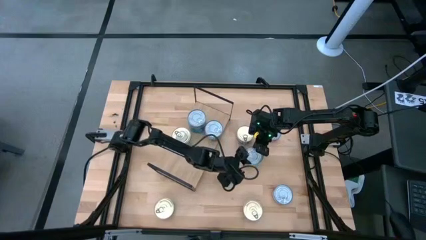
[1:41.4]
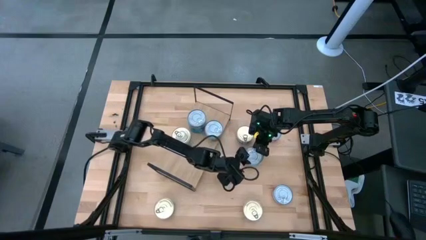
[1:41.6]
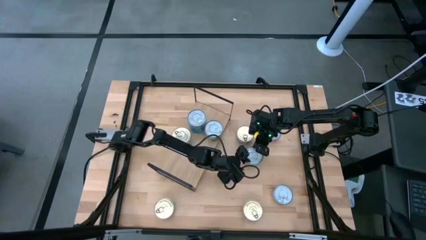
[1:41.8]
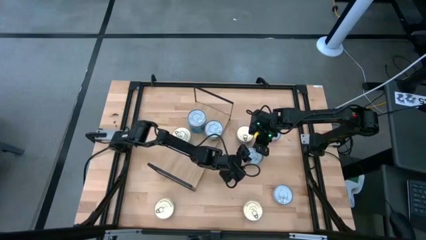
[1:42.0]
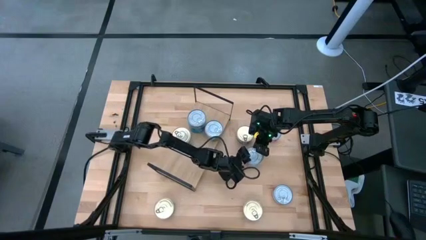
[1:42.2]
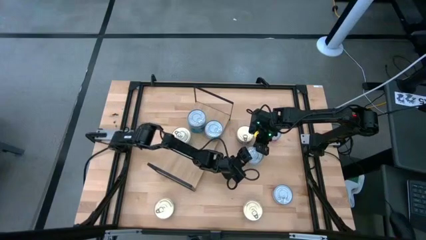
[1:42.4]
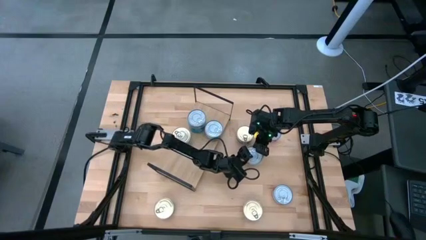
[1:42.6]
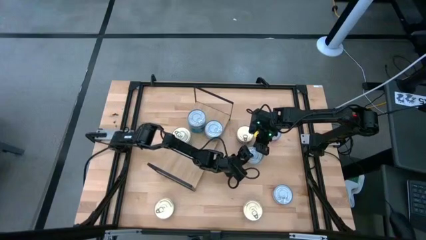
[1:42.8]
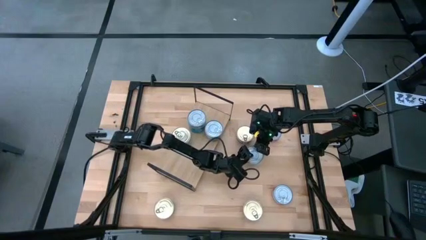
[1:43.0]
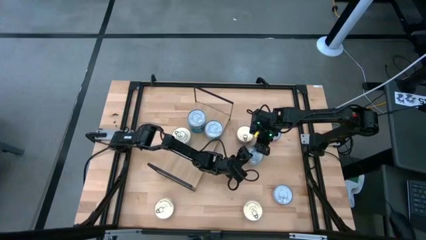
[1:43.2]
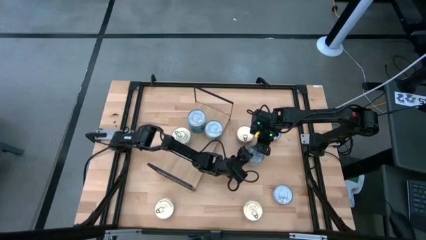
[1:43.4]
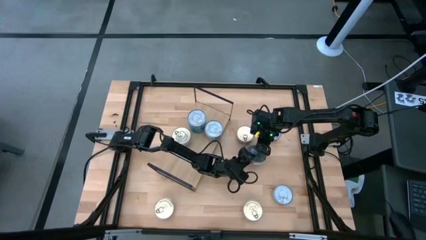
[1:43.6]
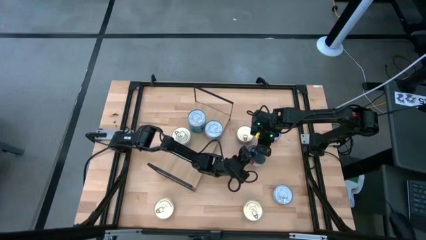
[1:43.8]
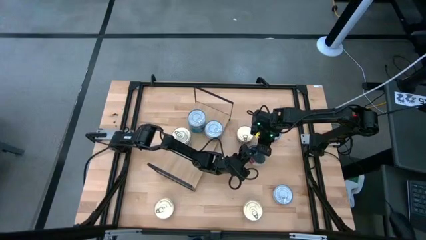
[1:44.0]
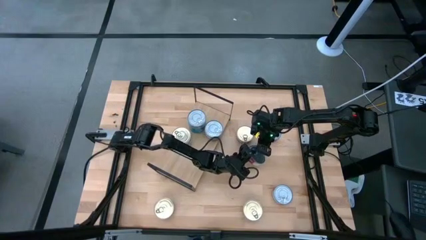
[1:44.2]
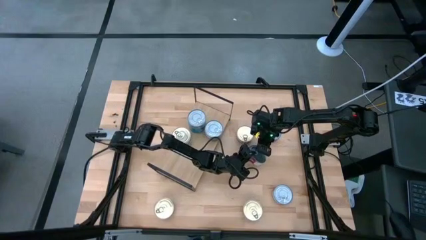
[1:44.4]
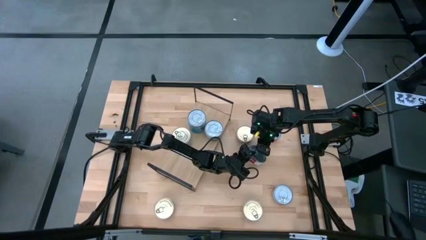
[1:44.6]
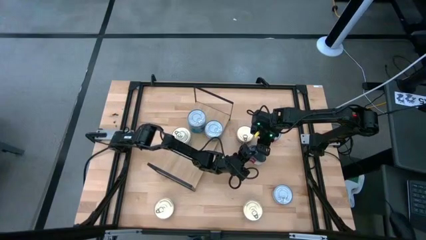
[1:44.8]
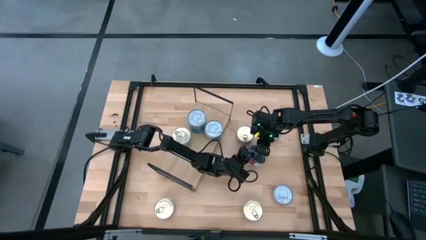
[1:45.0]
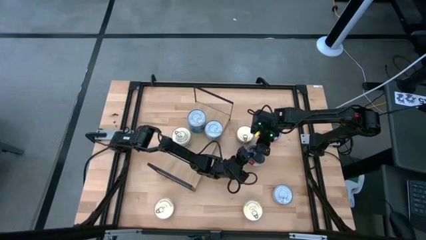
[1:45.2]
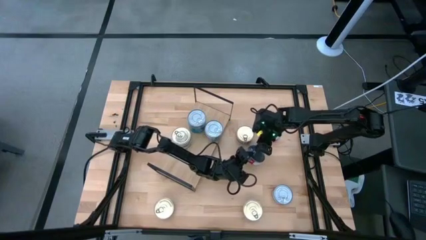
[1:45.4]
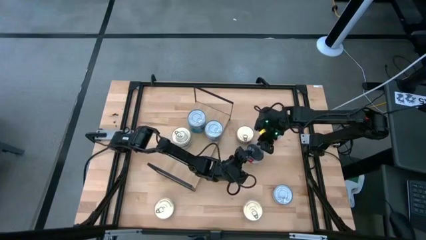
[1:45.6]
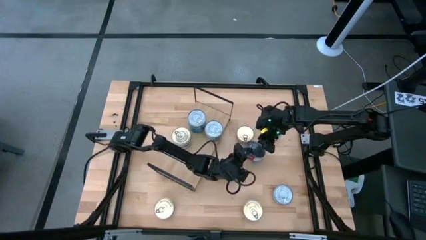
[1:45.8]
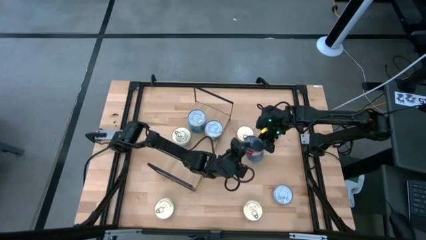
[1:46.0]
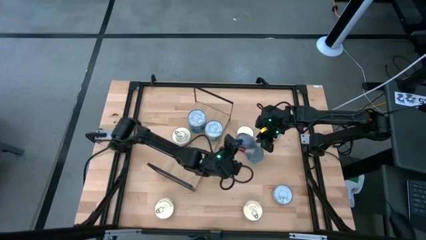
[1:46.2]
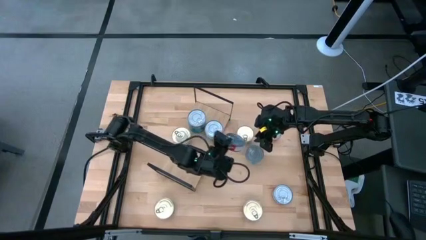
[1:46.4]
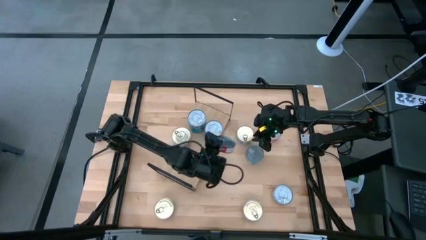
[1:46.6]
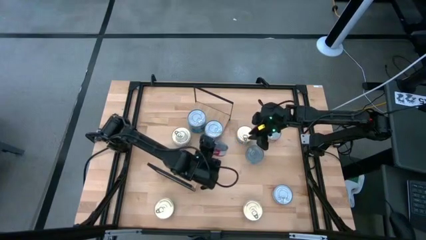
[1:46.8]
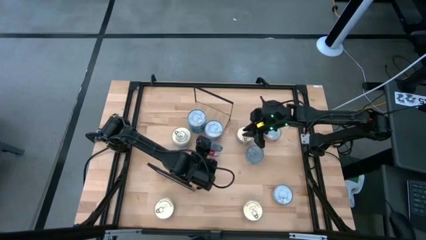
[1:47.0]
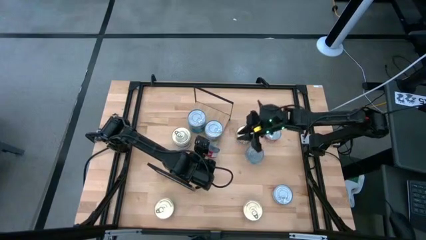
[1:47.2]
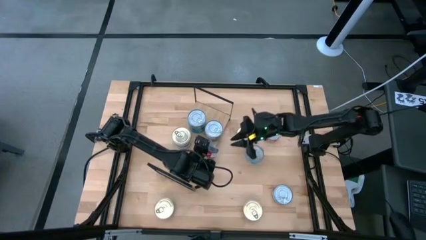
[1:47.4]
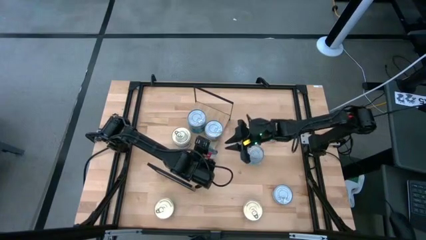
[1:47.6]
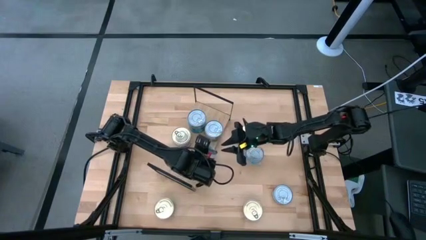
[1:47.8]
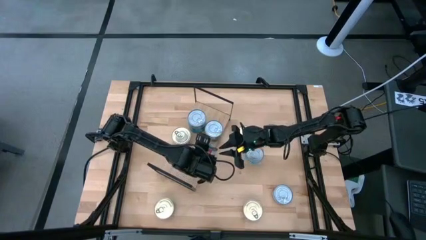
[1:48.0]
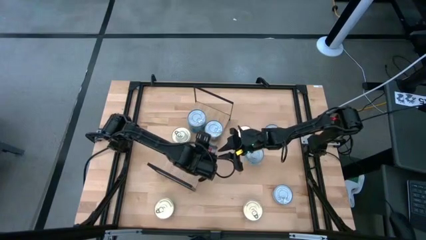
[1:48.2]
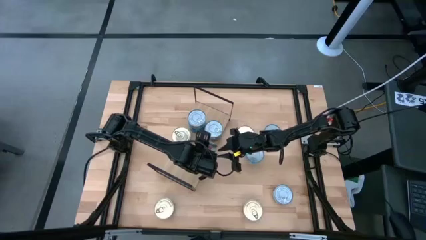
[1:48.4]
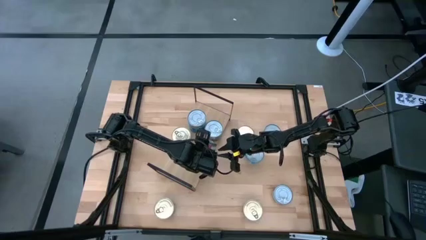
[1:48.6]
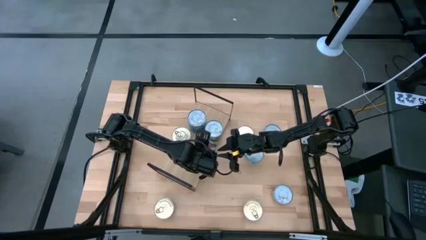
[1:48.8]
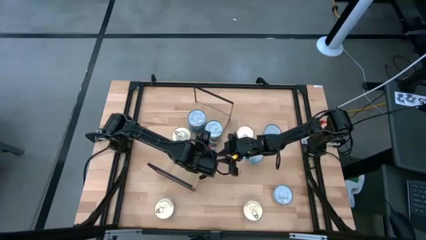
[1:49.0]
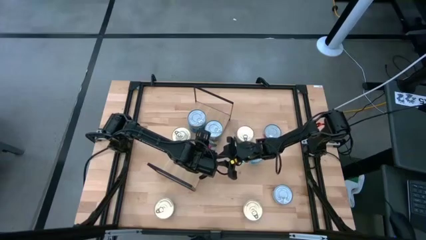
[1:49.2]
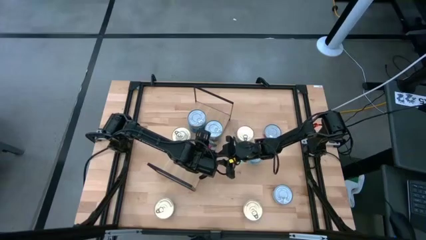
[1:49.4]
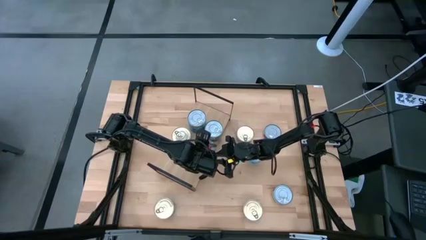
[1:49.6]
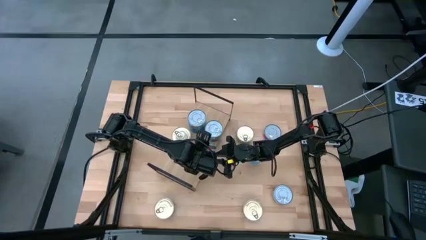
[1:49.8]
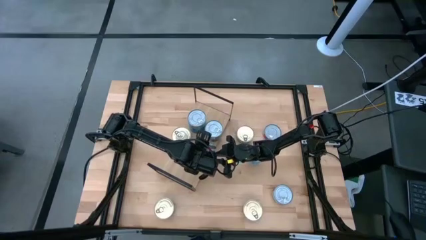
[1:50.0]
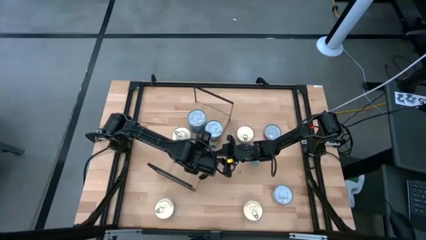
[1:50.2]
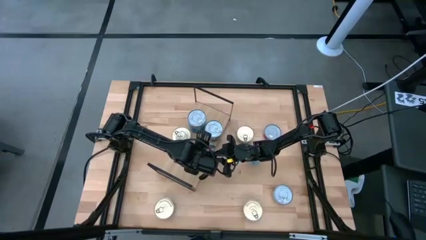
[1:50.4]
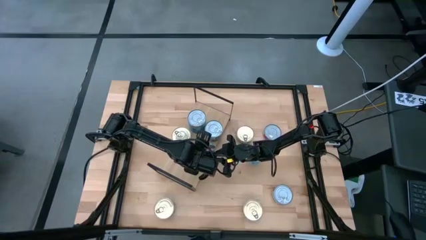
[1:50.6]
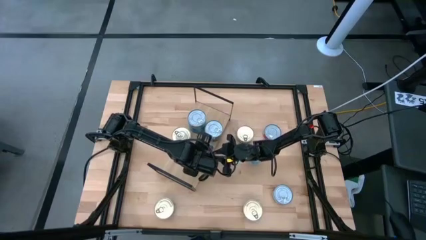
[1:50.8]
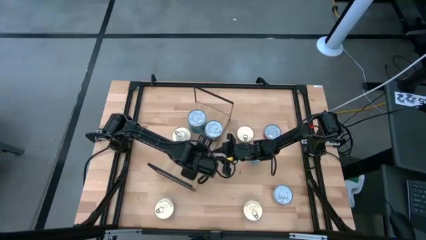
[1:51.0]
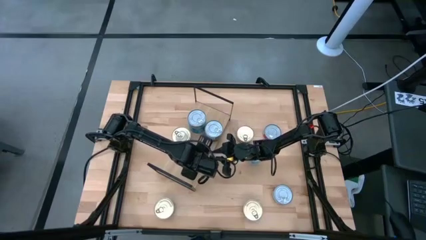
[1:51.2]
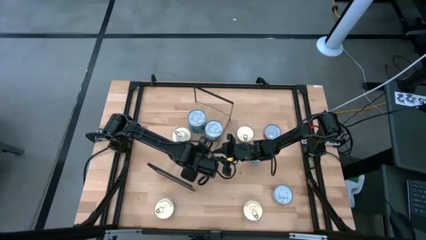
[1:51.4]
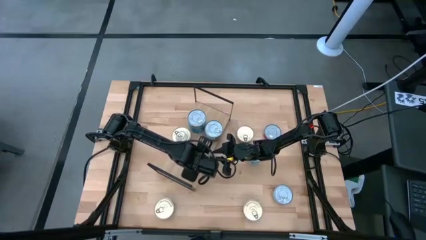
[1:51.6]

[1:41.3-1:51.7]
Task: Stack canned seafood by type on shelf
Put the middle red tuna can on the shelf

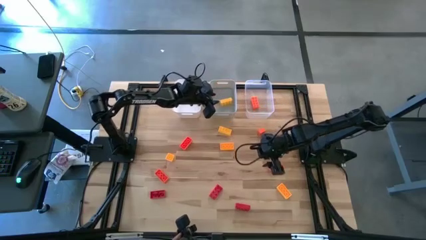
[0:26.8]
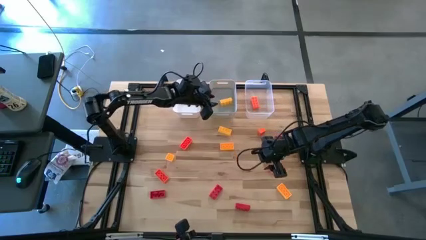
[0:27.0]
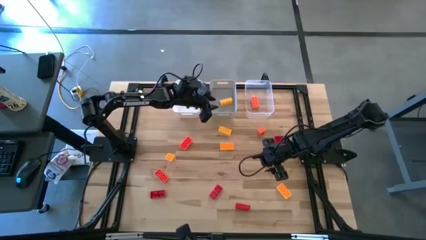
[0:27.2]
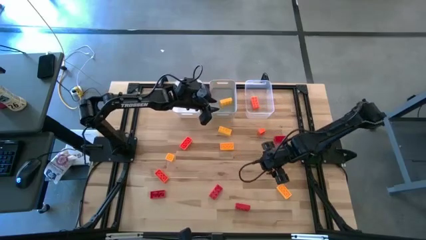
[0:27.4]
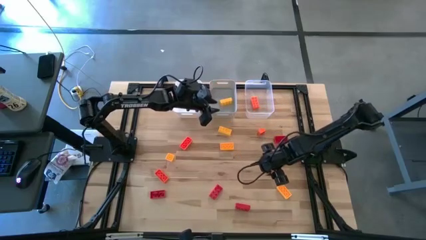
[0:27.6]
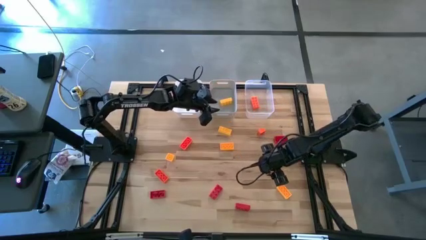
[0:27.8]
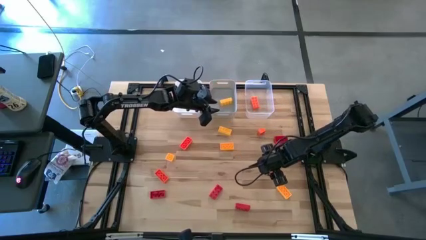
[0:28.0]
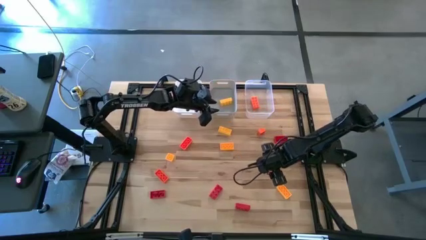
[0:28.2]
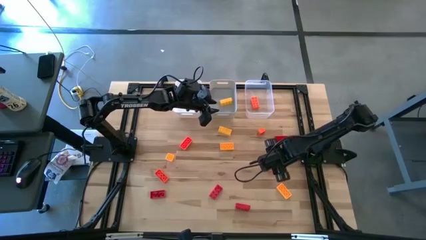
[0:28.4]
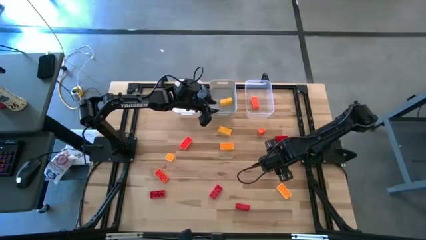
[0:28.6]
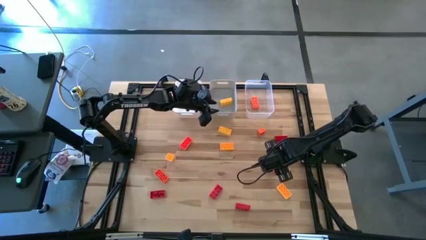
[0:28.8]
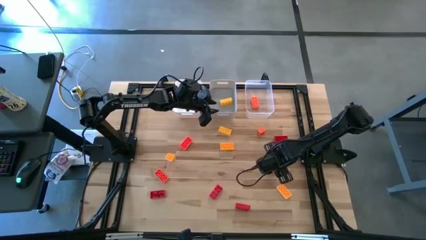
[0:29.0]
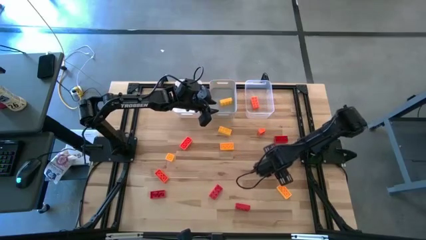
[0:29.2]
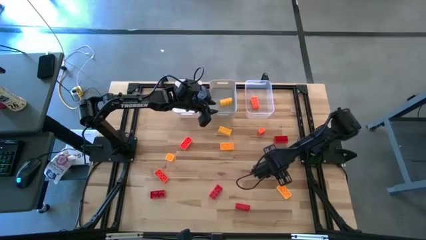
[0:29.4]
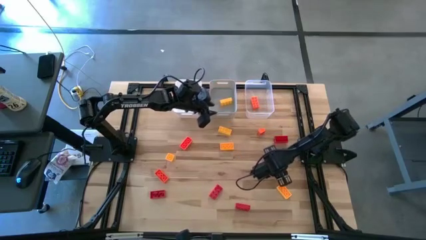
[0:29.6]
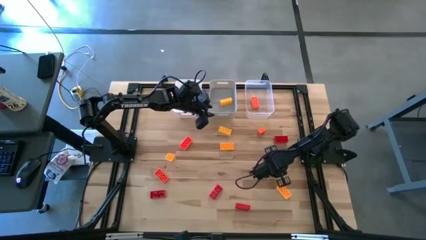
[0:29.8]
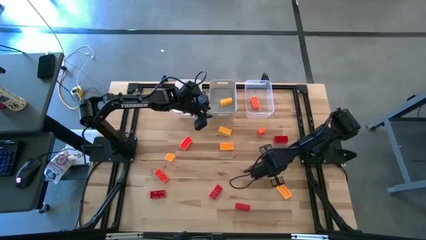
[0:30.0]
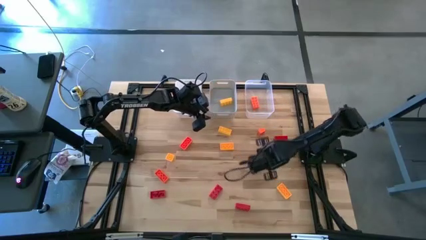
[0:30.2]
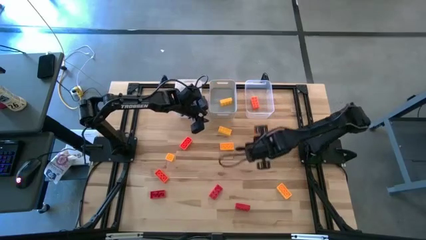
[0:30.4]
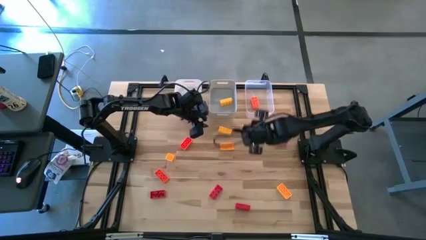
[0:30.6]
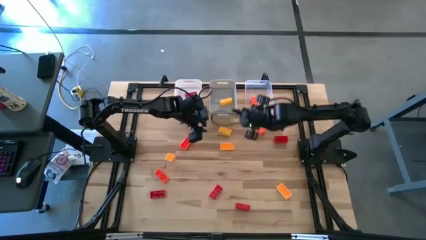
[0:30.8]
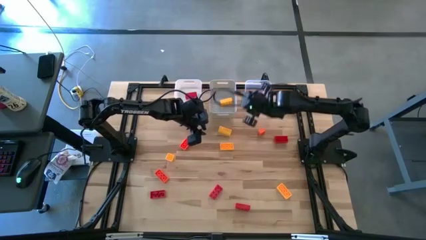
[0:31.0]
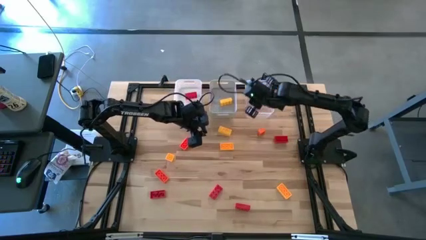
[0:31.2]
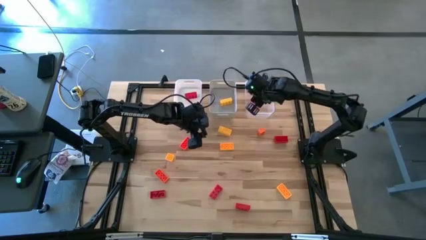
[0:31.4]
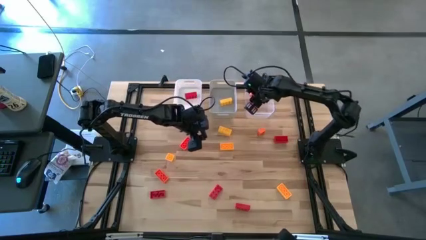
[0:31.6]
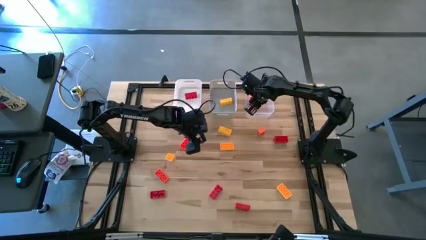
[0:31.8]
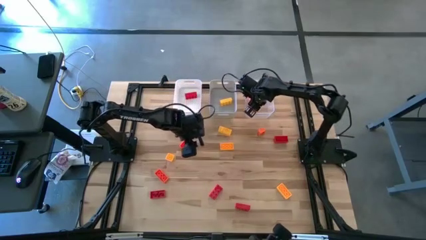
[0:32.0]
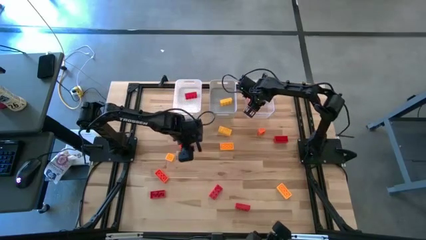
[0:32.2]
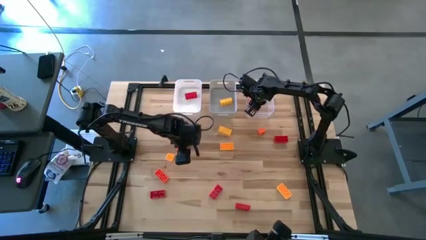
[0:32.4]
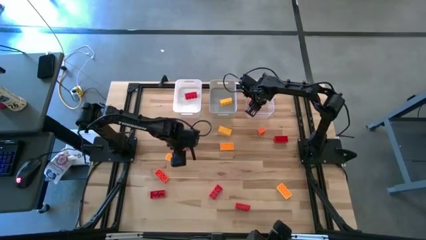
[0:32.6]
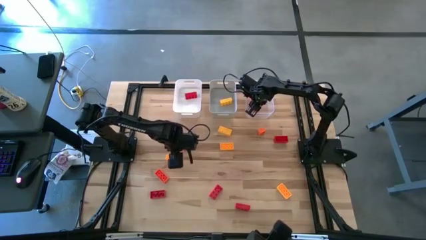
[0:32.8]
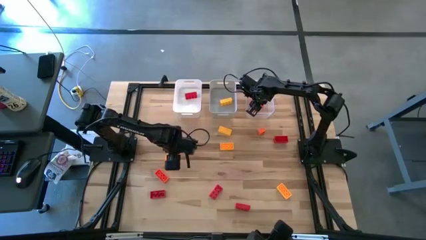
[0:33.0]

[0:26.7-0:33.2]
Task: Sort & place blocks by color
Put the orange game piece into the transparent bin
